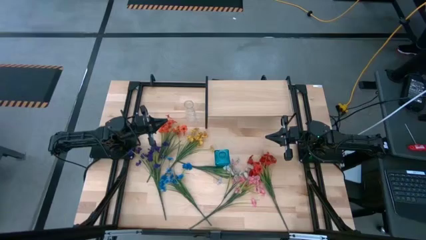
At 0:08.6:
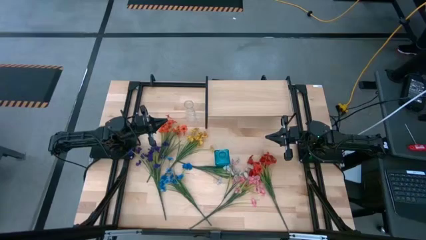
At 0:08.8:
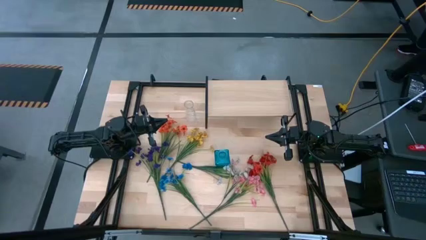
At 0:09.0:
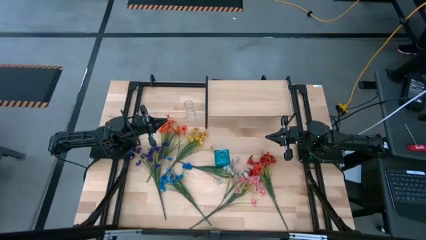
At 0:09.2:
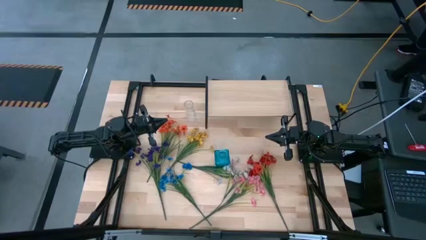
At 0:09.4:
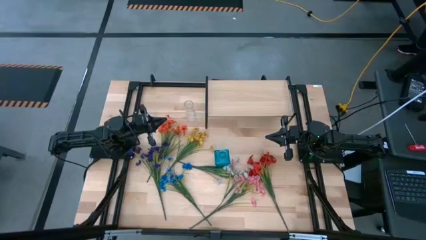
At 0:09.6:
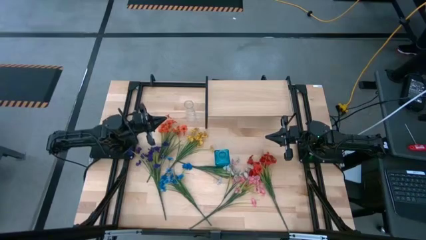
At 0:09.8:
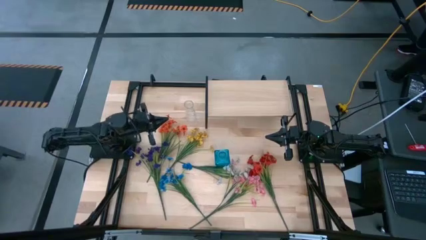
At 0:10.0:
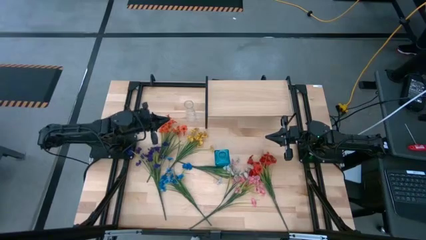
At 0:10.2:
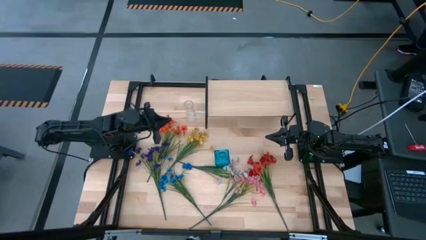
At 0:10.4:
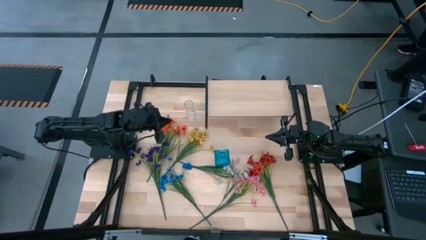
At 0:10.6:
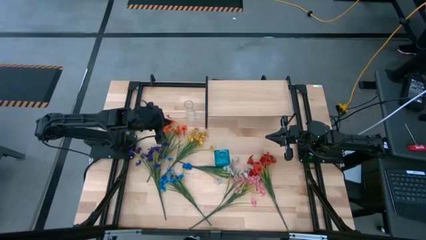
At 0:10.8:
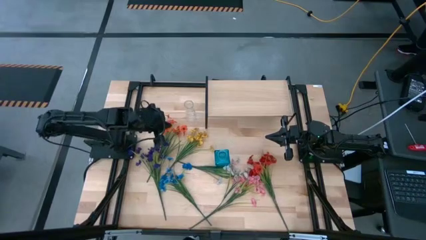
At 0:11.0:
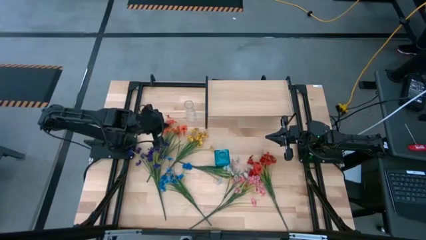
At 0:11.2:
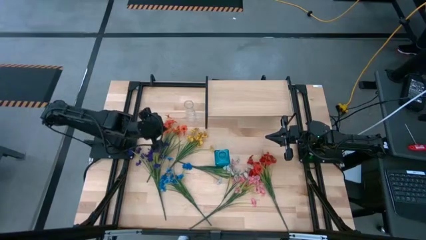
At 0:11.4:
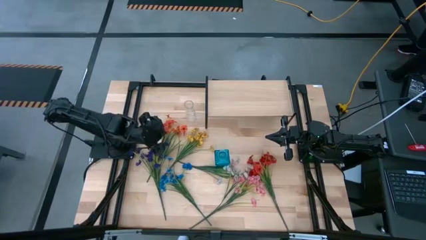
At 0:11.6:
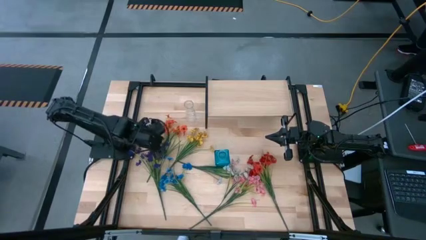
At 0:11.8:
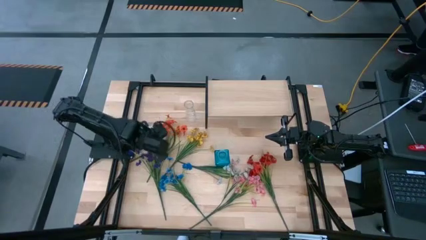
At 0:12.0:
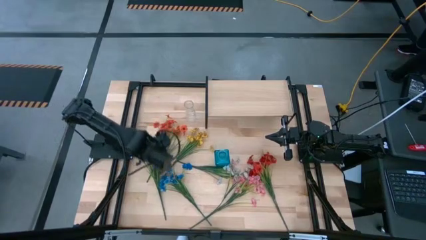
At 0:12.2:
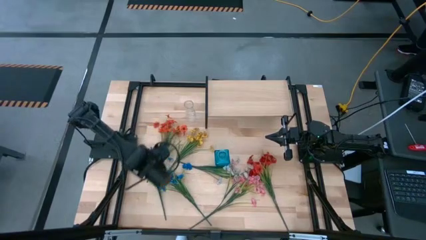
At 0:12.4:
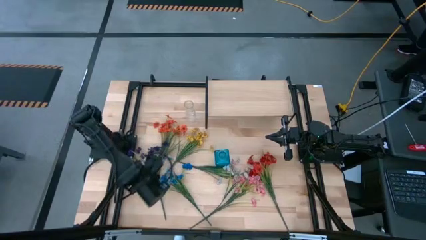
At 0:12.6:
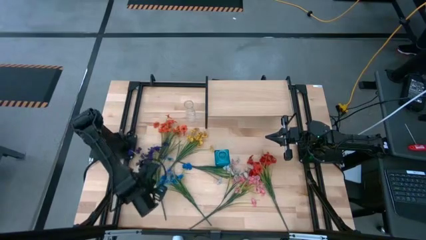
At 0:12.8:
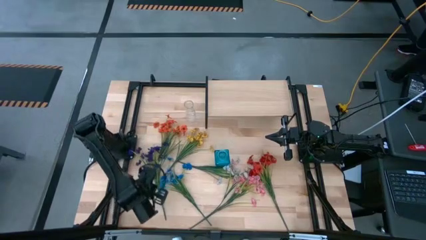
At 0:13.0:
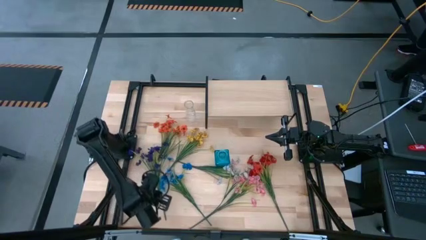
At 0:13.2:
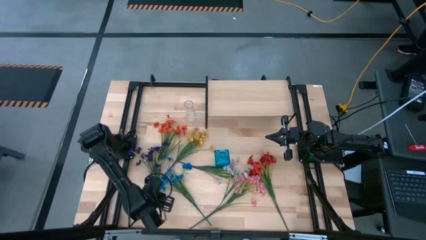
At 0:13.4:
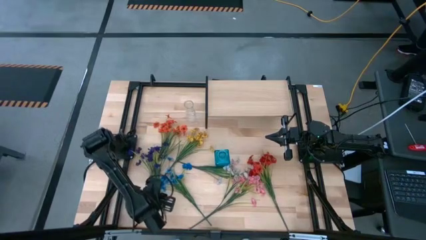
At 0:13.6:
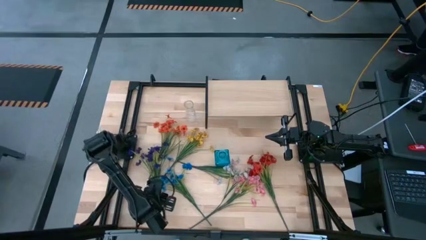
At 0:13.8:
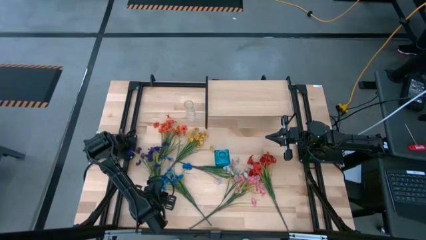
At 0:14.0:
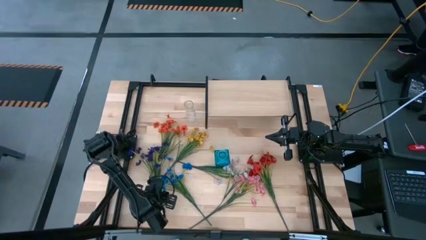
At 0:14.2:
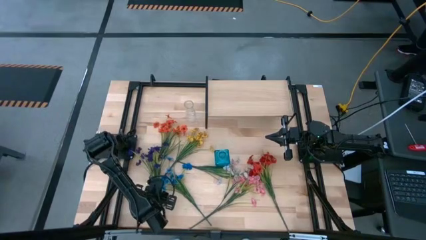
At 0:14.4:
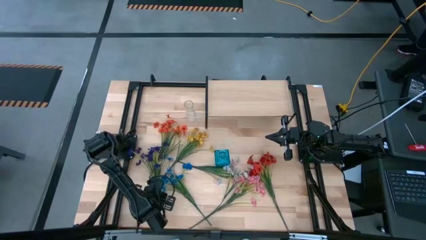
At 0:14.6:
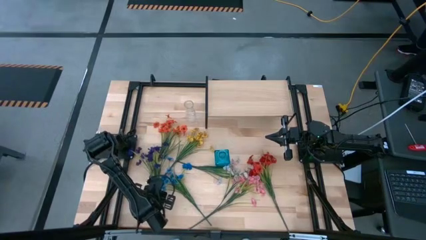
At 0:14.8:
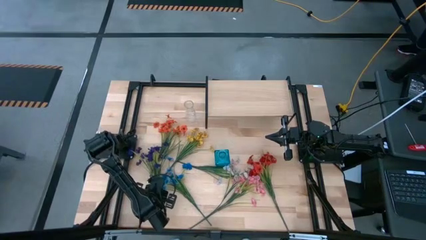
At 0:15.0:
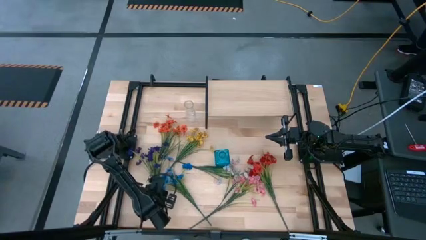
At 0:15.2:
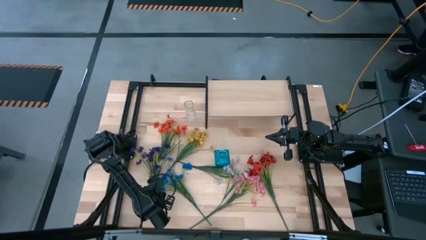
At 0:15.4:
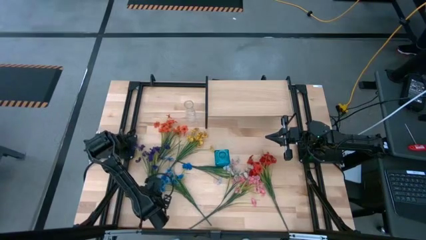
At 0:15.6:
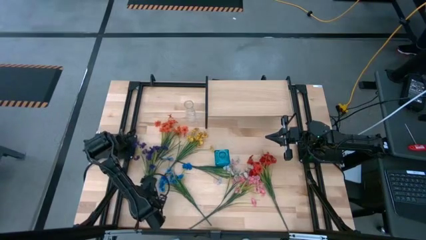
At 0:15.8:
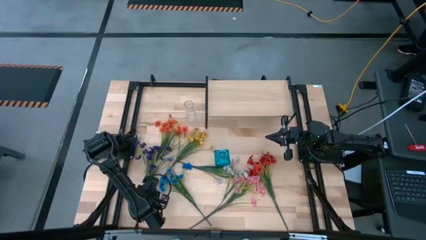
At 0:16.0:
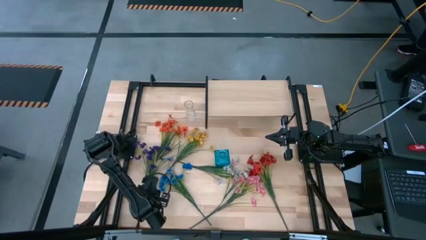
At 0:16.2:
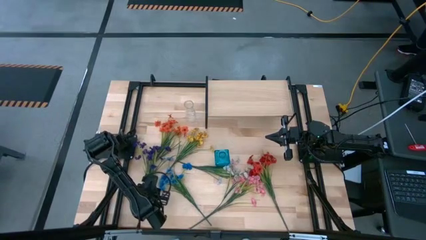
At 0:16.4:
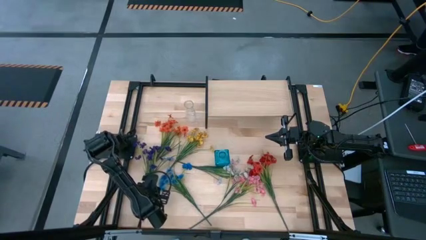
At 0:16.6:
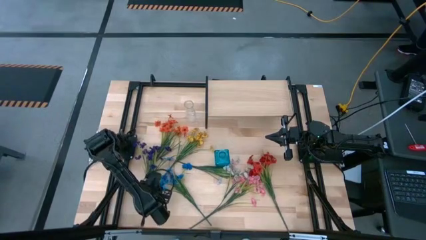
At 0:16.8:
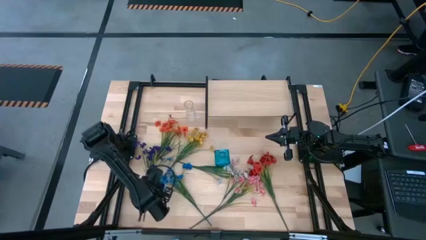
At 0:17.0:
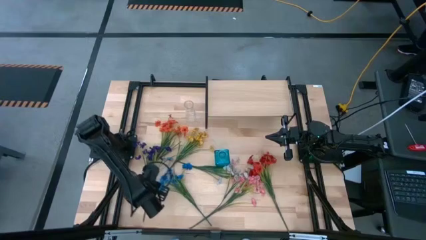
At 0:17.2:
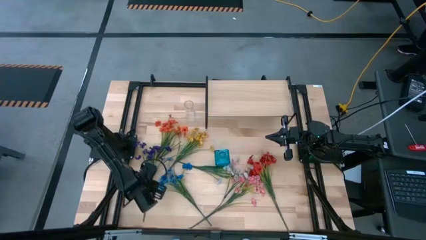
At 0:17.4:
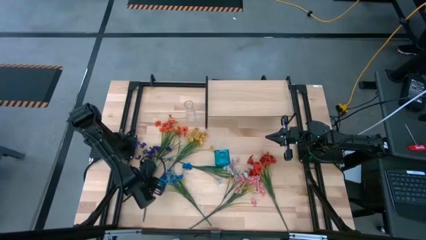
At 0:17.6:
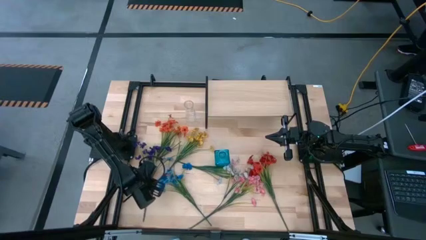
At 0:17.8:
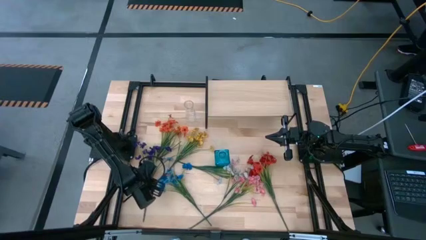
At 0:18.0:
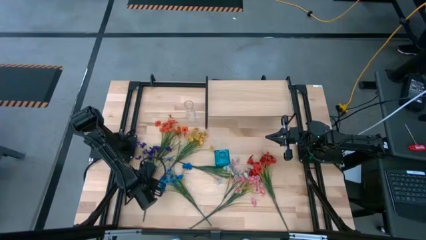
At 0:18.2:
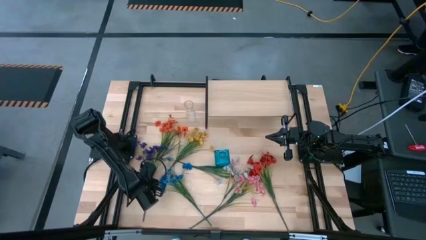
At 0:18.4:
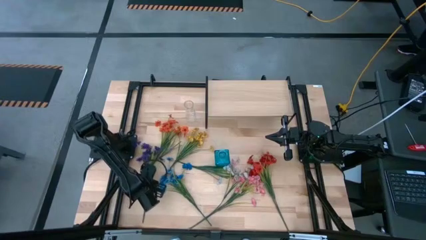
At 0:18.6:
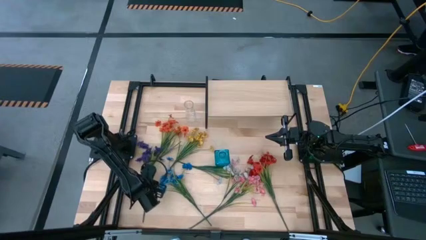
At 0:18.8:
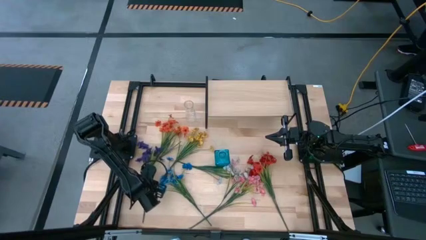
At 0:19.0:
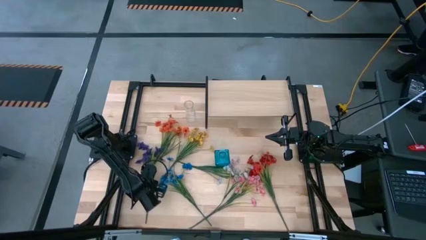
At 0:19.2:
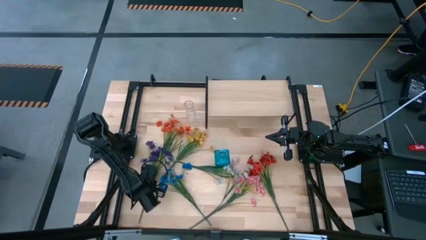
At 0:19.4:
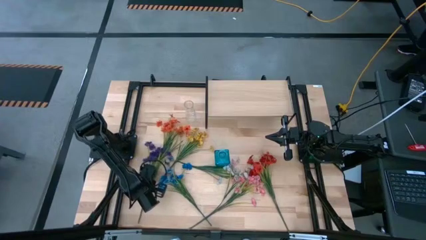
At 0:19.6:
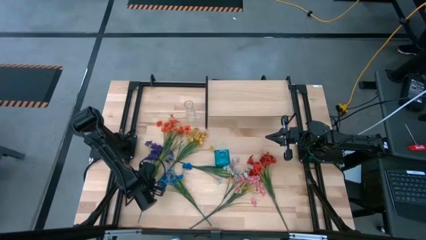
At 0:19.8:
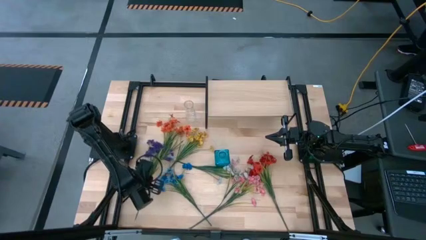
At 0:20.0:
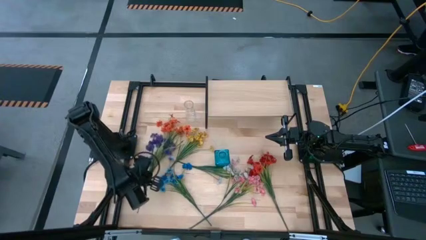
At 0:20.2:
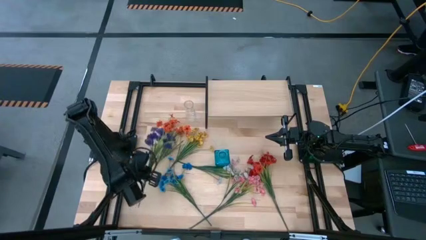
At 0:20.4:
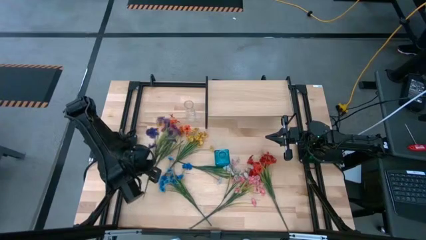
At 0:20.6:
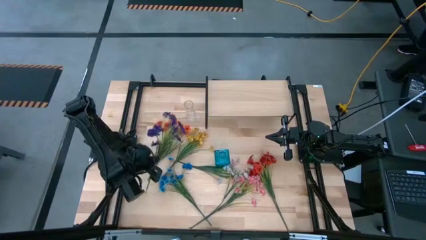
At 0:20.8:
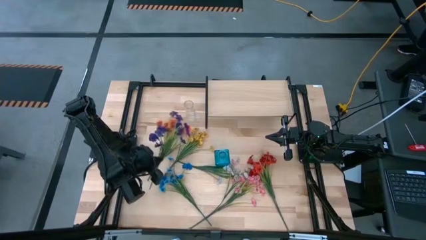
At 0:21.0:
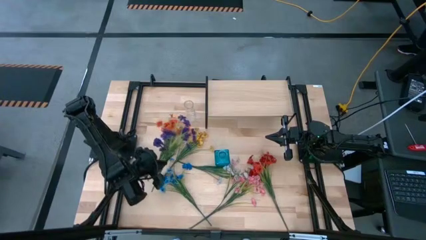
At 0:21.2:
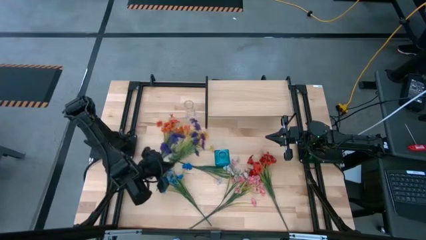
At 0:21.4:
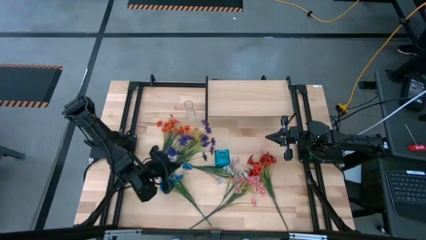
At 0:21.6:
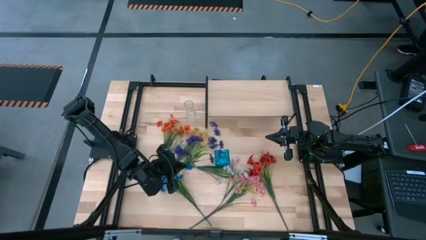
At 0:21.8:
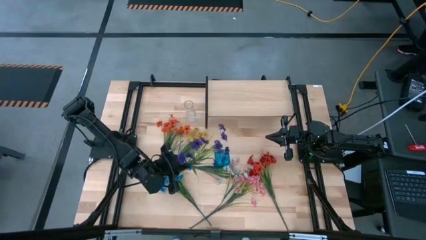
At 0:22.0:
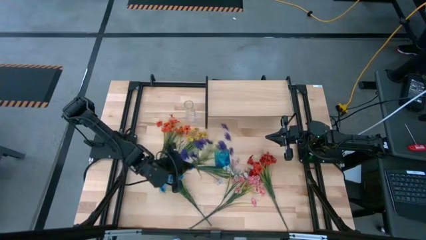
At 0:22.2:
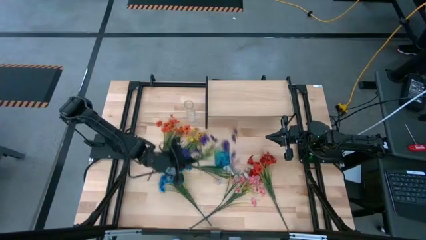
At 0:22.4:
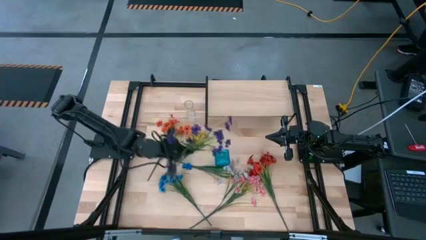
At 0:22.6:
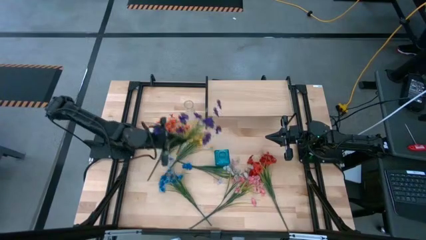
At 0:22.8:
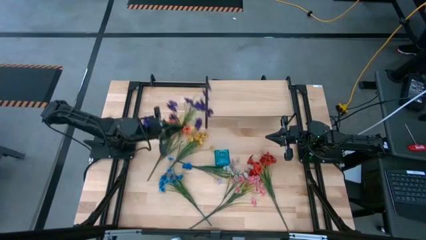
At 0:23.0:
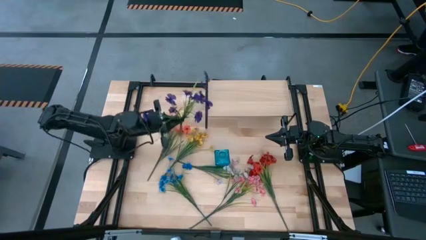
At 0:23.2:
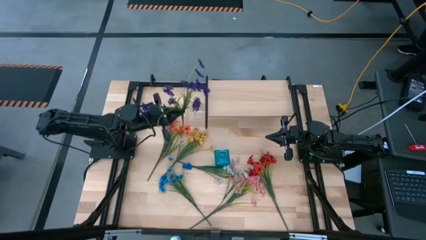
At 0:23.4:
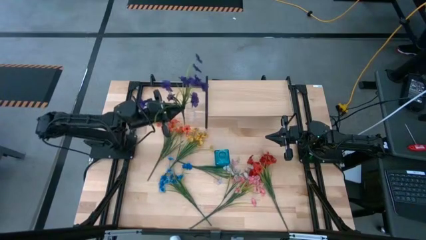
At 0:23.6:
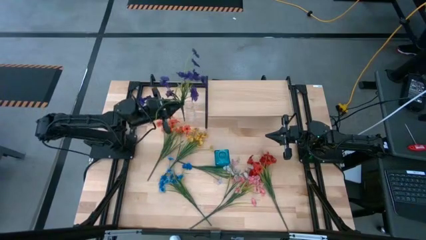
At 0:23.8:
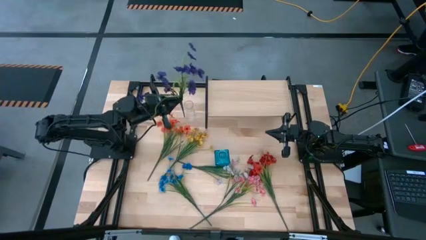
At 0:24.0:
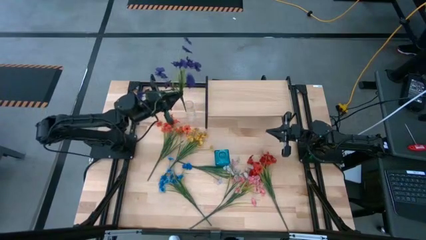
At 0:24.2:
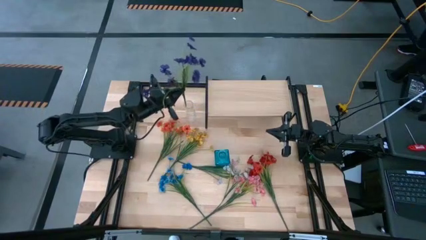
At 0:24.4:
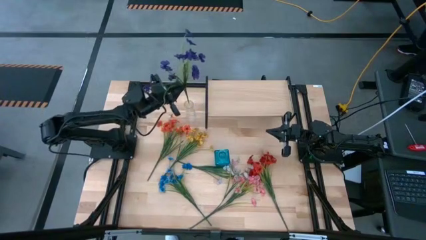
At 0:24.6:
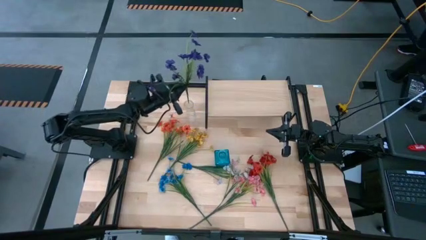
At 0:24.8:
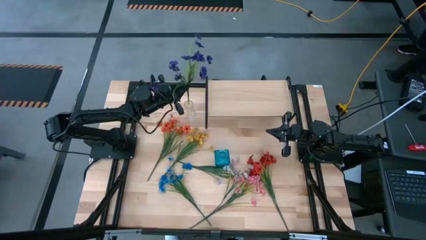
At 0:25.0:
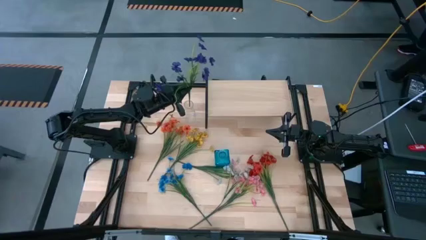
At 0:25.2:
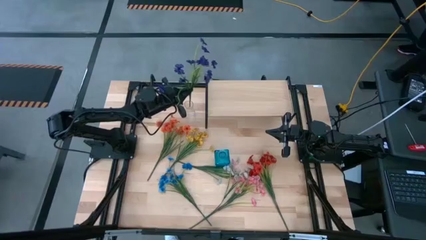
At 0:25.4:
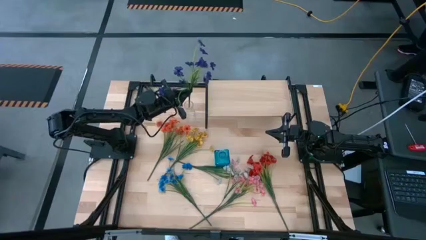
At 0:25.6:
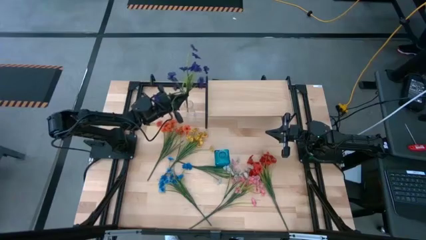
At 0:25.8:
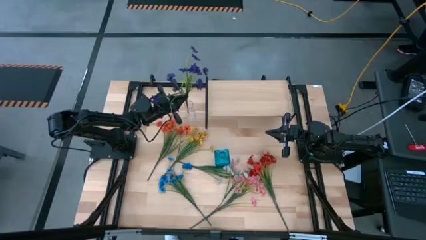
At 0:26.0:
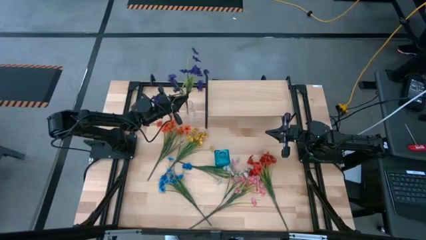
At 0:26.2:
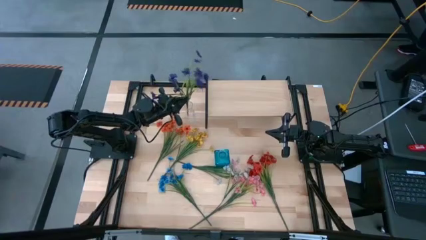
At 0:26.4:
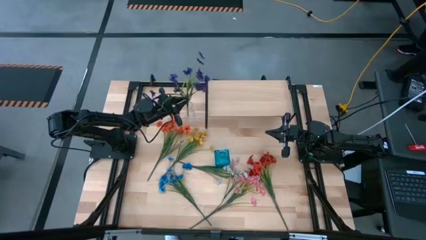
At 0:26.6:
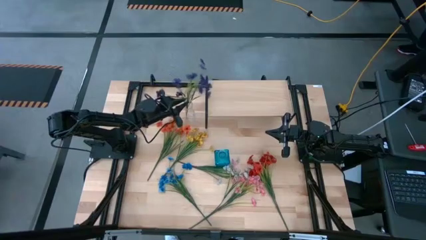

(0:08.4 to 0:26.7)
Task: Pick and place flowers into a vace then onto a shelf
Put the purple flowers into the transparent vase
